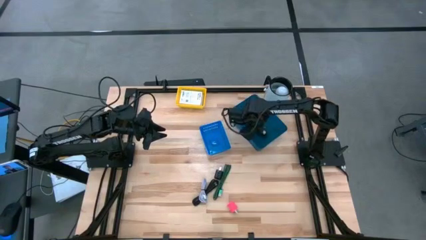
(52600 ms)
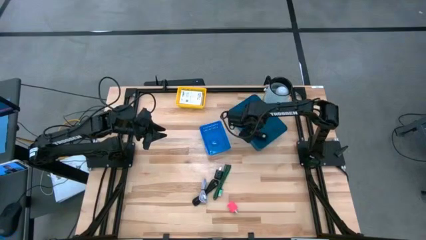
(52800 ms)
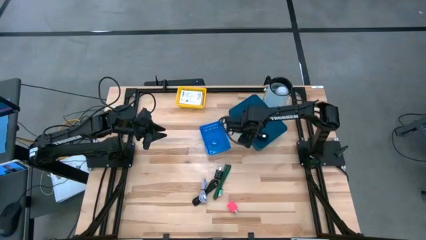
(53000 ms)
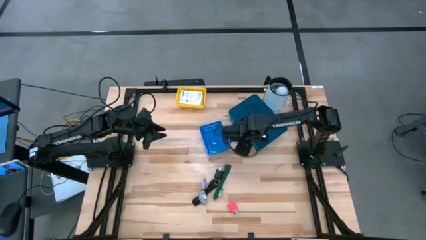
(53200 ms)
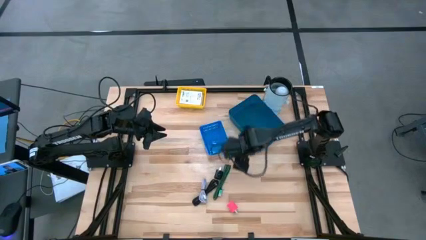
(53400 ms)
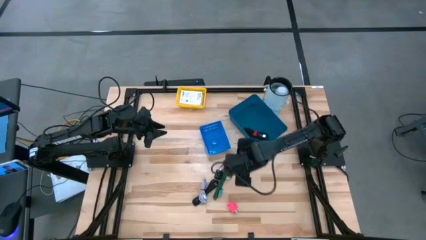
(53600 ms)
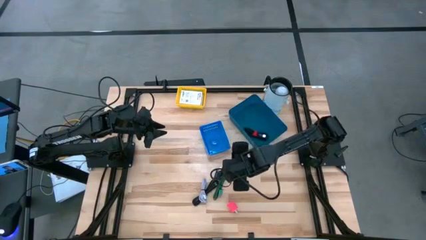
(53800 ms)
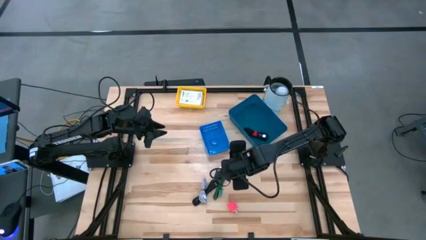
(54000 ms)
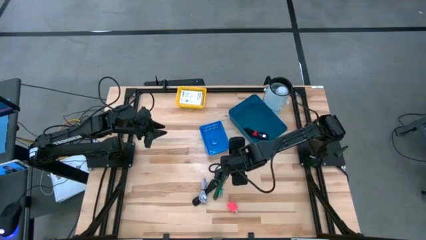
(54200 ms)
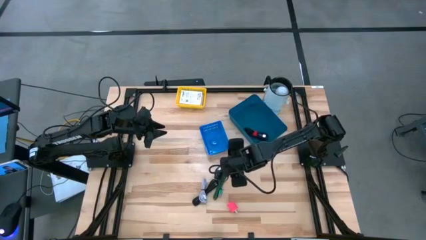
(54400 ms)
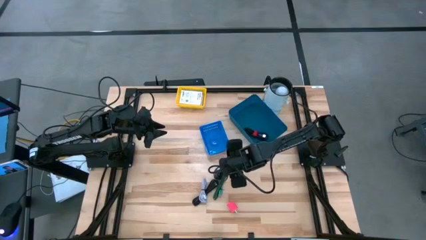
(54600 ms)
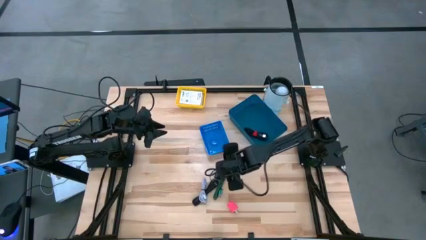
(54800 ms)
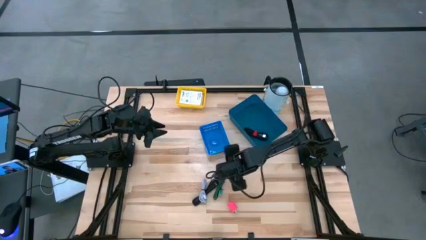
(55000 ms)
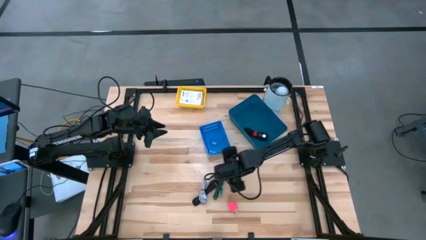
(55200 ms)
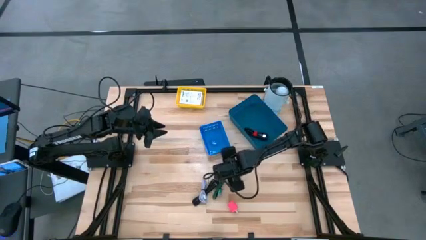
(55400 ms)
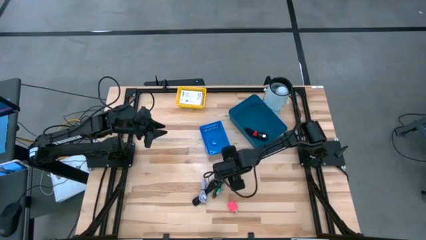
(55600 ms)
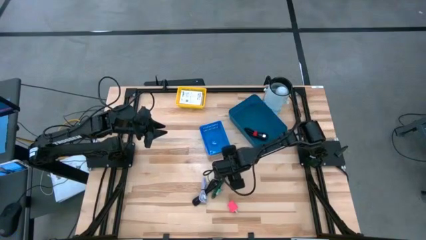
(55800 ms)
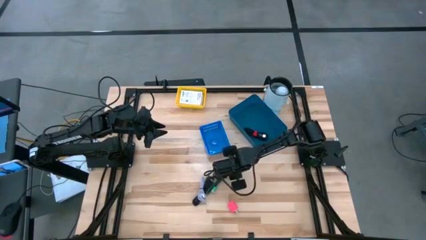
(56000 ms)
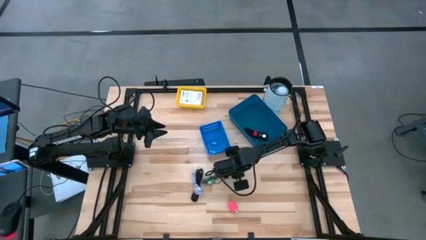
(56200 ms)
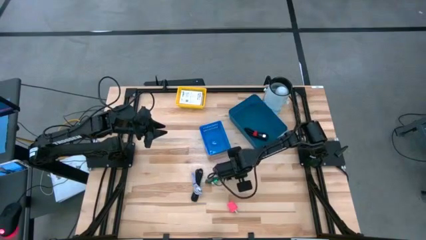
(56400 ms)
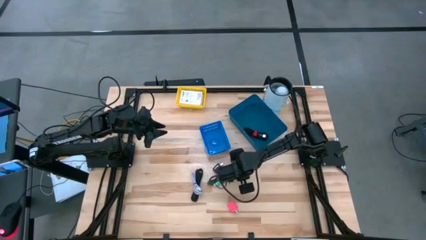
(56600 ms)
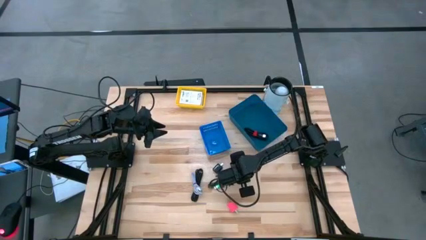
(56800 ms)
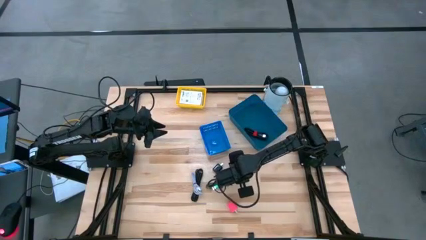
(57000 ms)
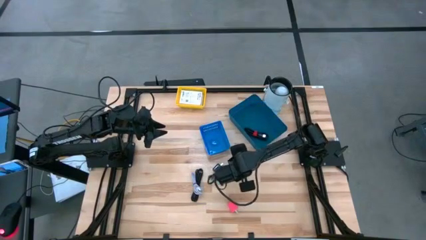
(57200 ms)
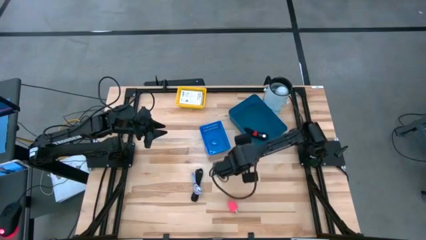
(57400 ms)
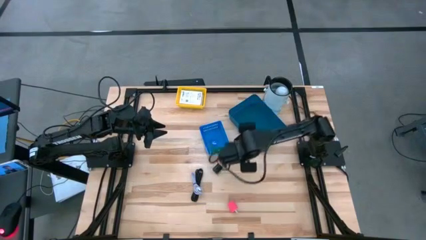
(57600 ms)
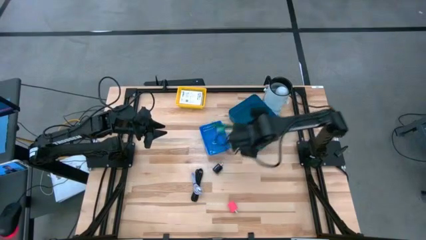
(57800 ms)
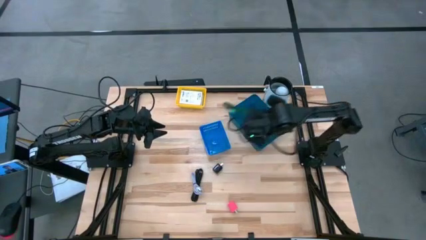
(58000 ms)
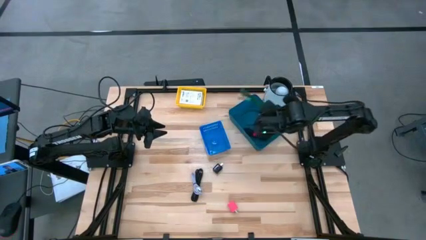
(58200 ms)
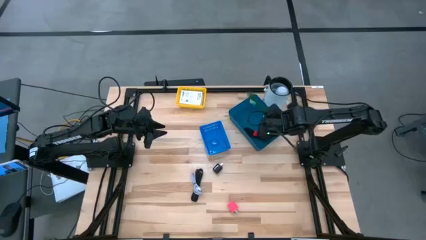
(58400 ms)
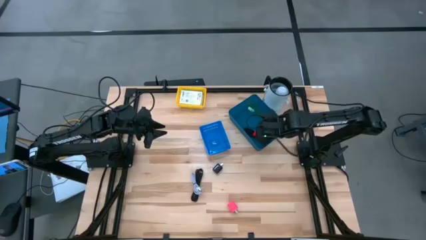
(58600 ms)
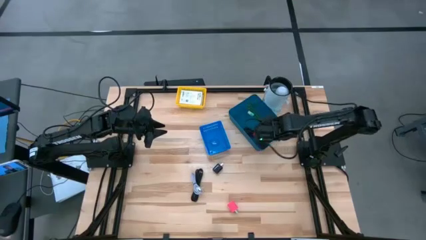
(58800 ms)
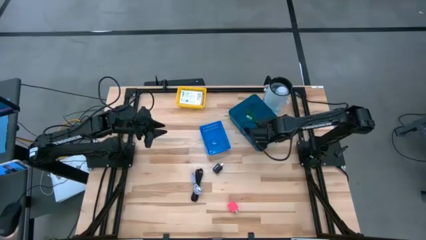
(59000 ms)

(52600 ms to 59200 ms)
Task: Pick and place items into bin
Put the green charger cable into the dark blue bin

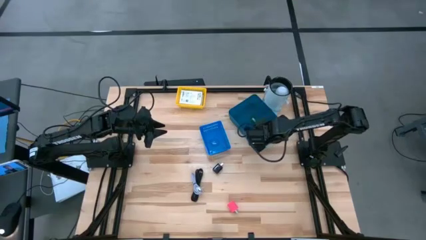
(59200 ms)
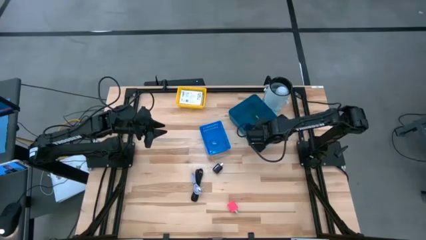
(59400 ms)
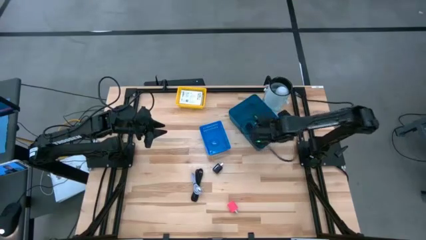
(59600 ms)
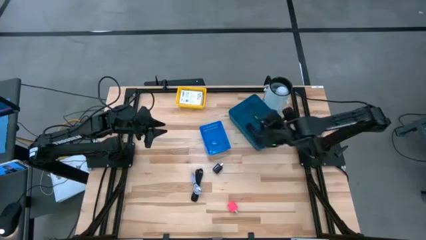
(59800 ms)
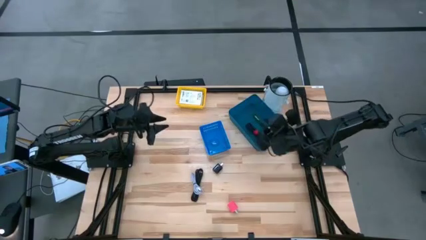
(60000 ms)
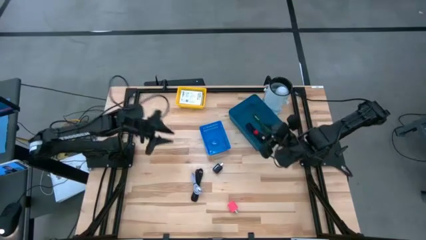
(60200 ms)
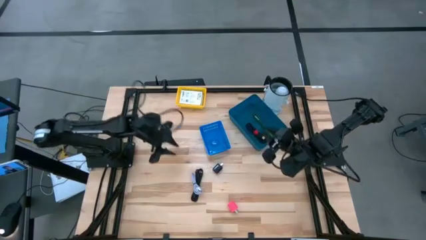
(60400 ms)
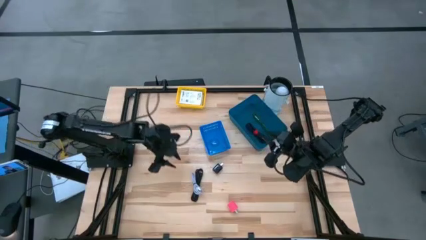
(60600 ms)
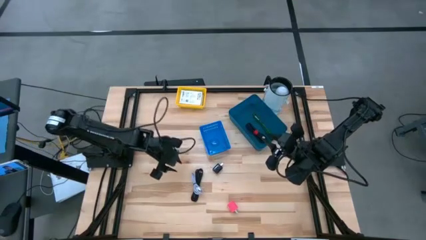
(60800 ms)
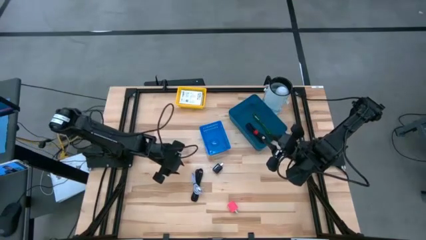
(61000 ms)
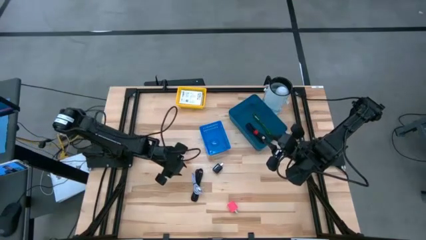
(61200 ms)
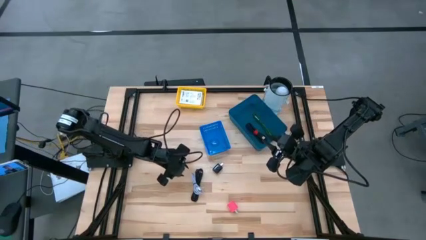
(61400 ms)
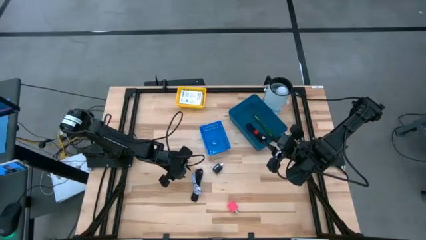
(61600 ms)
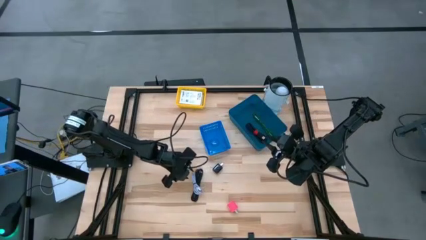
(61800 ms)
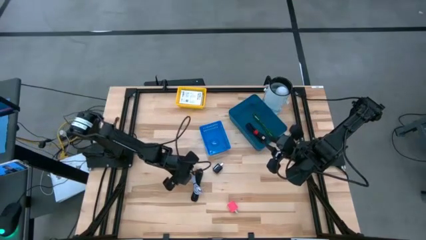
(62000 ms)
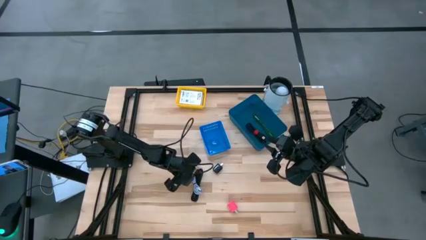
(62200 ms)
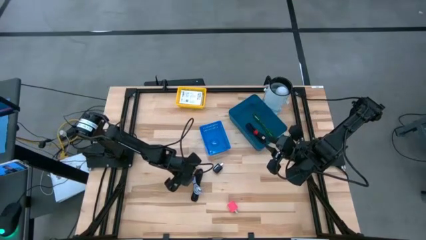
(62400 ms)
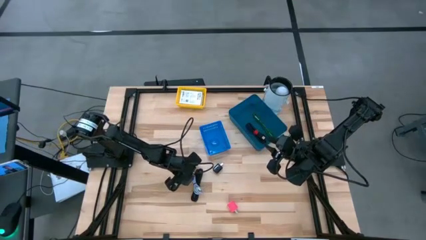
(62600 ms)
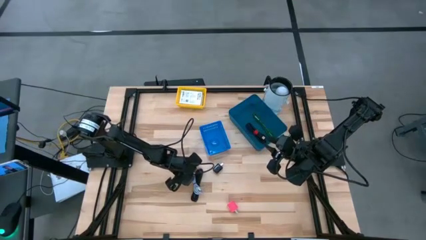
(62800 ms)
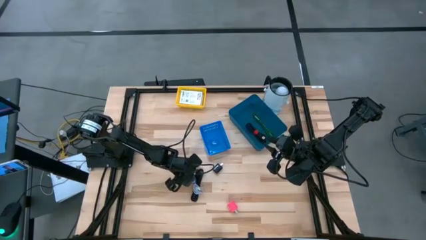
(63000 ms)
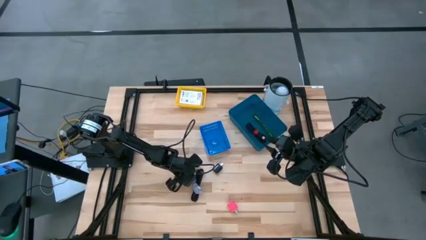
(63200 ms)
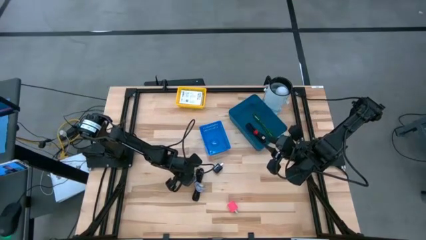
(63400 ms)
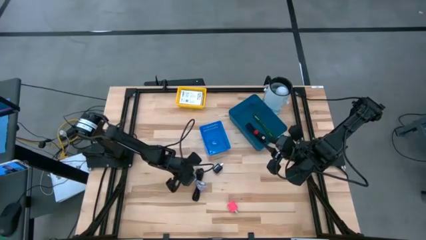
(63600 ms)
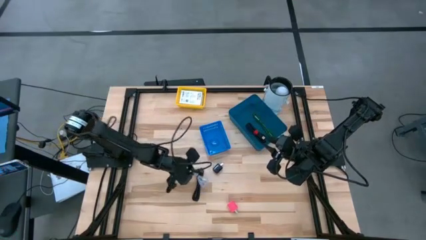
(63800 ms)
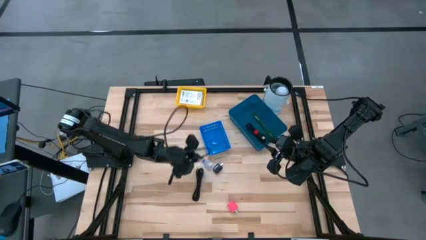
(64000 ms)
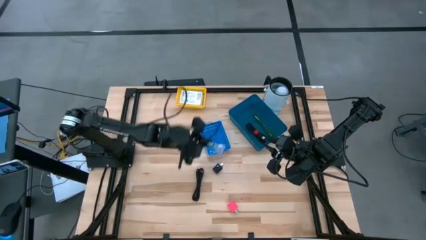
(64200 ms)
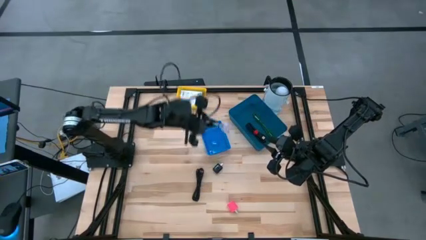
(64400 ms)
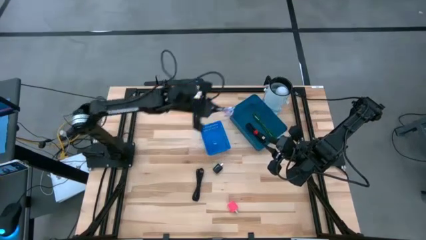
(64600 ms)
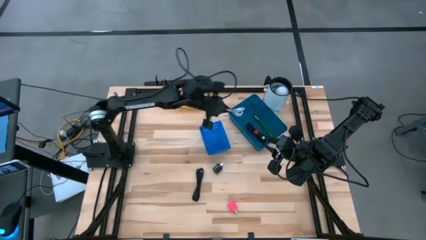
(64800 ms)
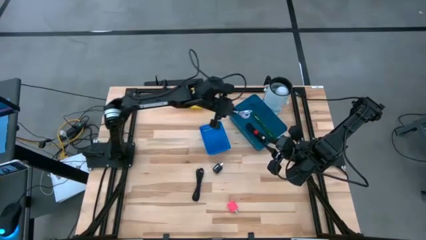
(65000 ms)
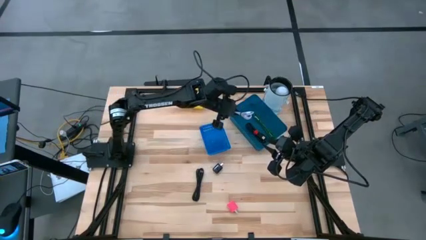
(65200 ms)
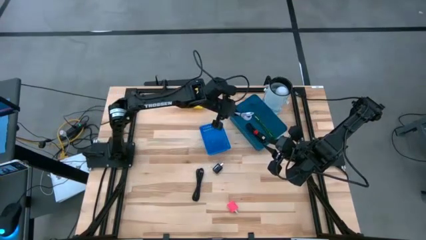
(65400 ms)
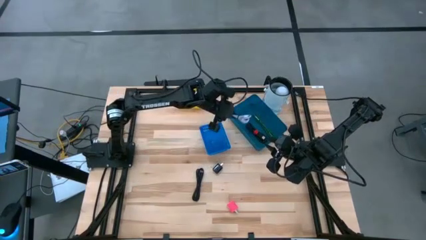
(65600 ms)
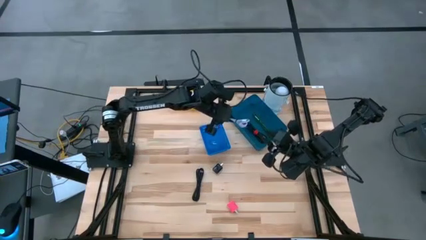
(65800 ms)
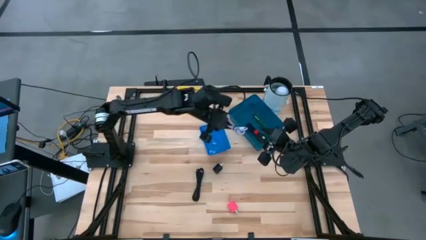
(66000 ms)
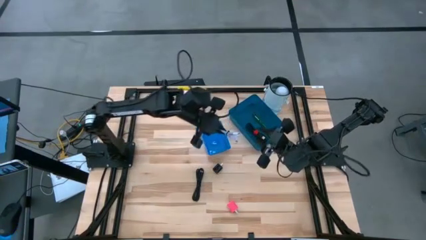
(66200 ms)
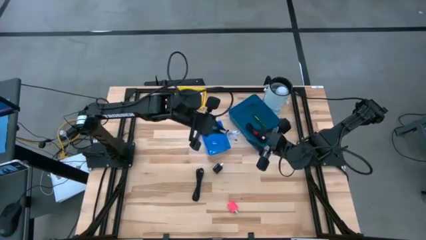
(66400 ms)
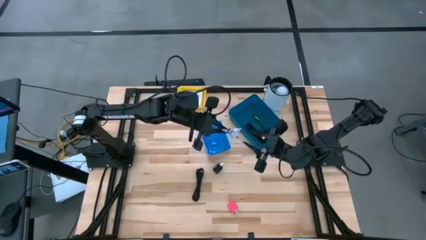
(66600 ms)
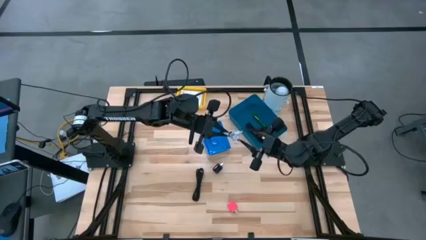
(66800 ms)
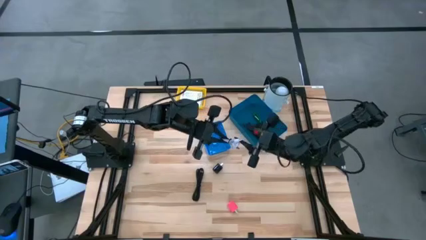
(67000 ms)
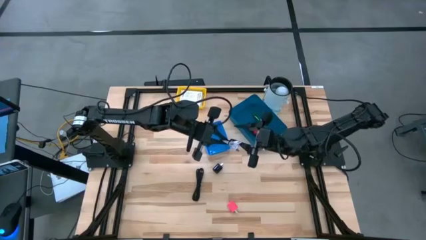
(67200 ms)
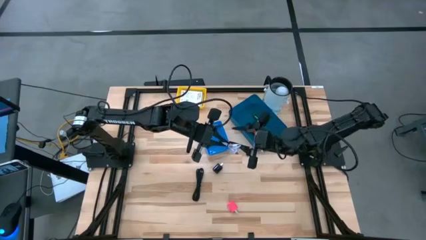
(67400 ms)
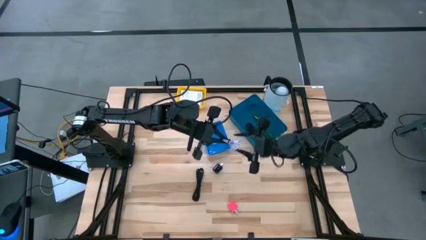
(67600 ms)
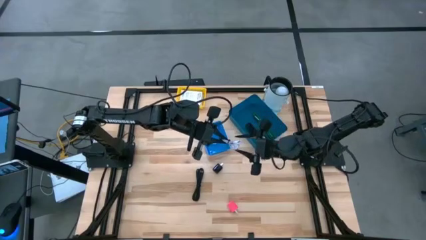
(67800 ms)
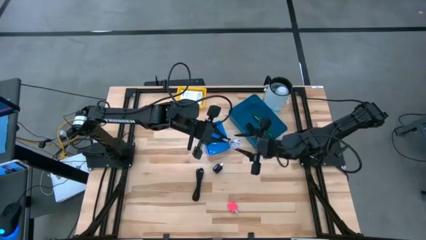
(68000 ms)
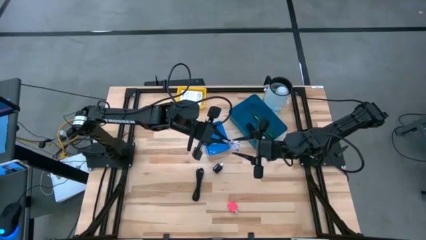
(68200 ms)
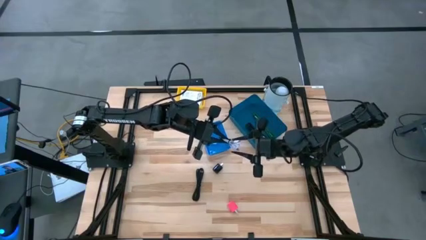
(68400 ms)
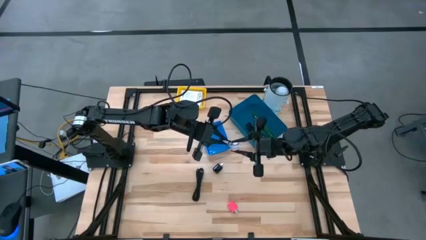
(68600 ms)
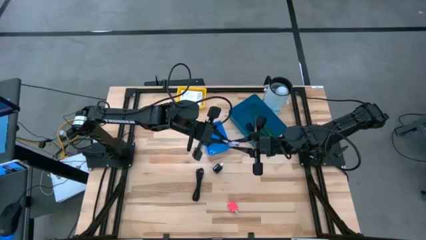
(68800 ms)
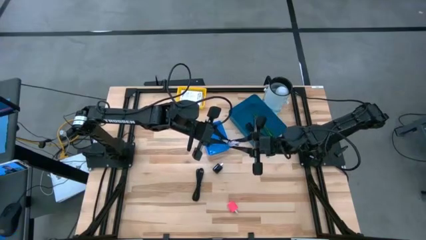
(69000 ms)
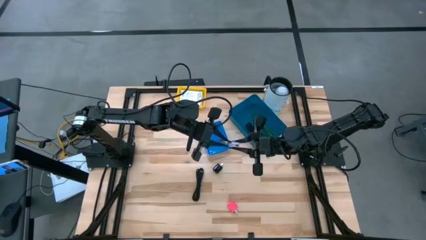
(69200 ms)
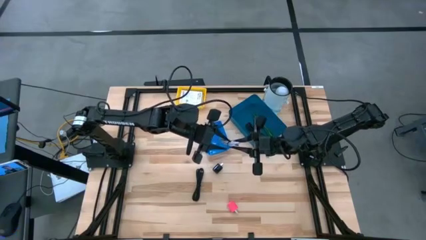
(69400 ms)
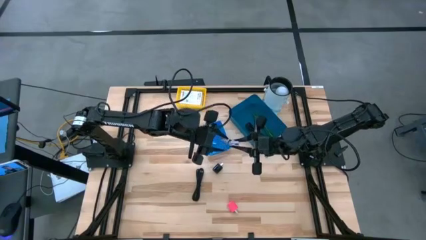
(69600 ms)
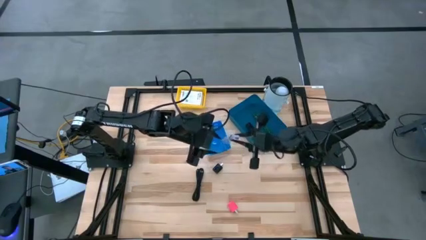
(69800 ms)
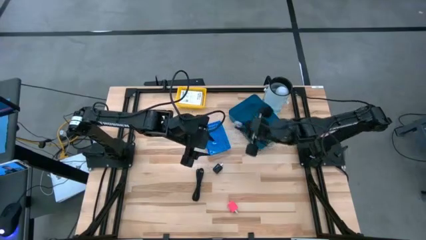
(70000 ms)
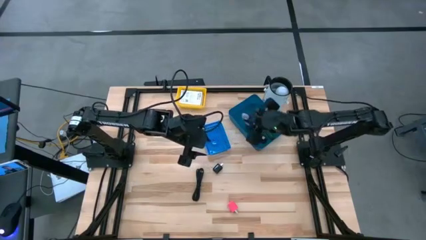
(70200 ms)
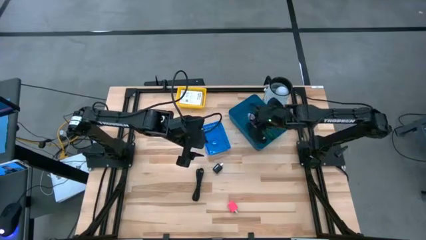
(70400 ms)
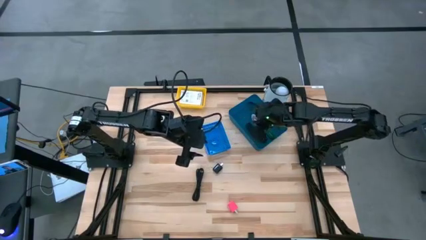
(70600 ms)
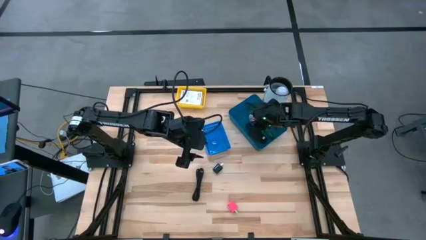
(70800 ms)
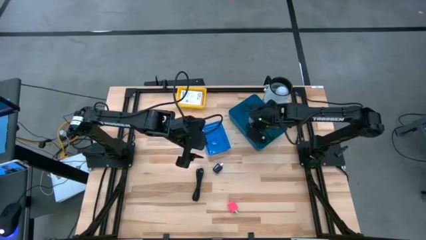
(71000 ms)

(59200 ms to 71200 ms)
Put the white charger cable into the dark blue bin
